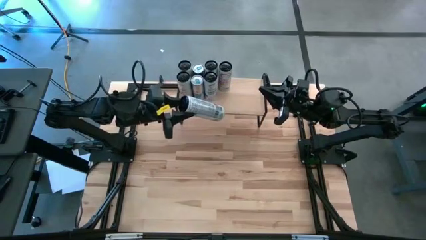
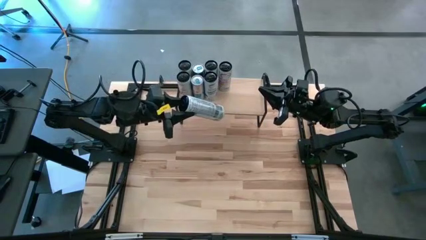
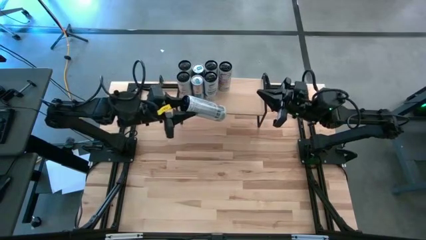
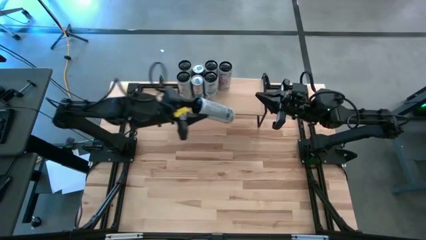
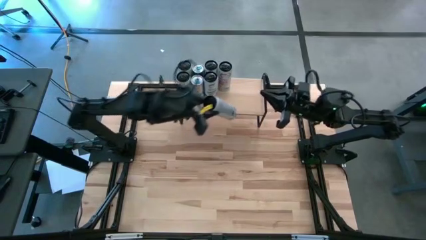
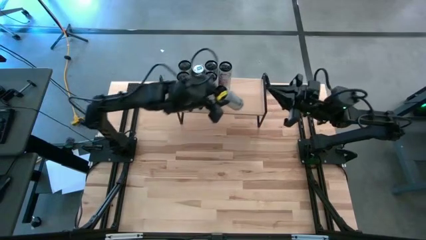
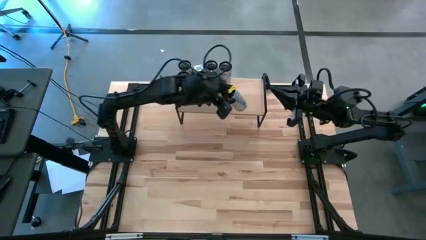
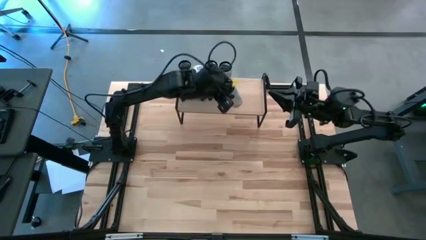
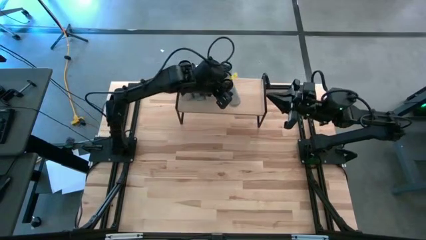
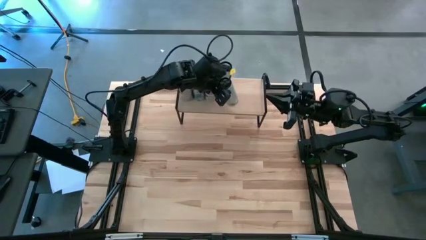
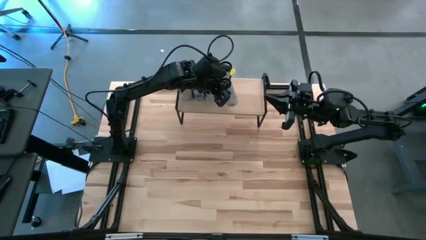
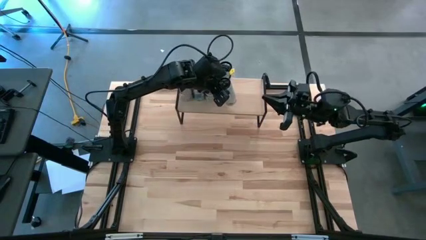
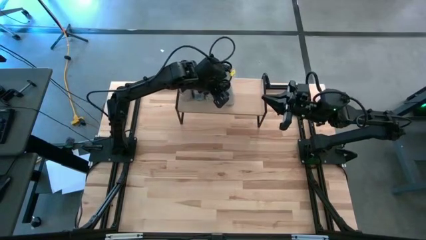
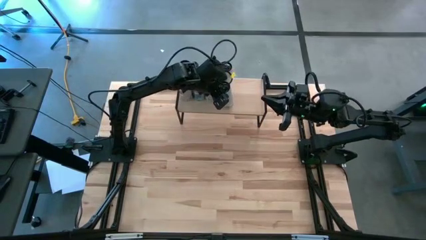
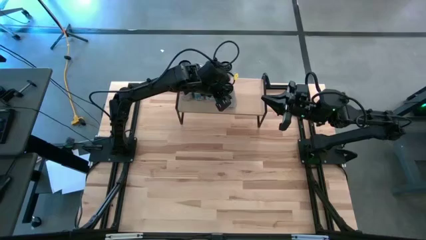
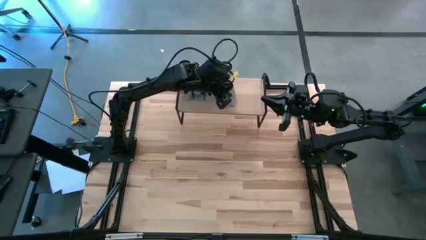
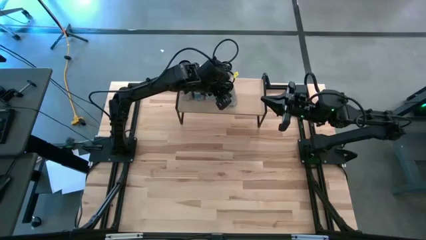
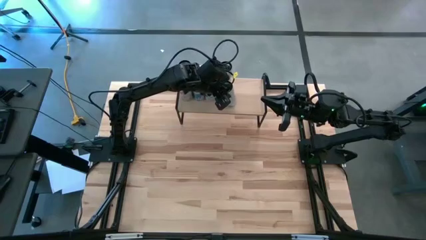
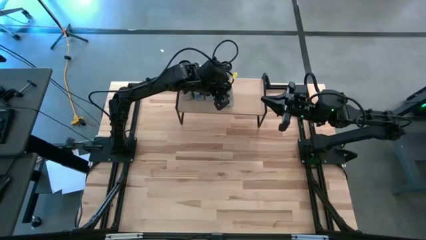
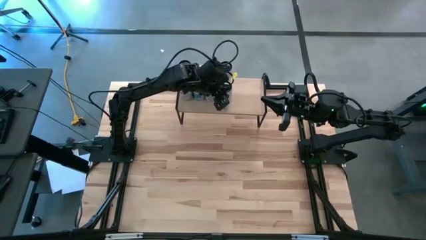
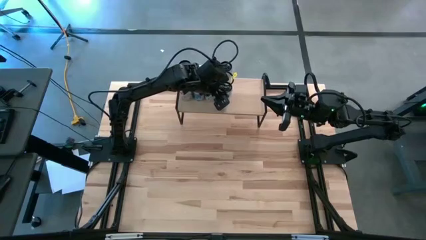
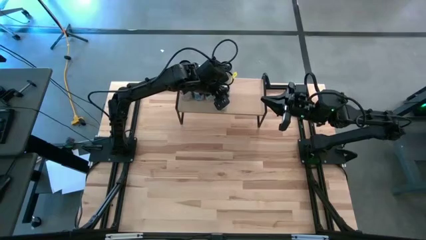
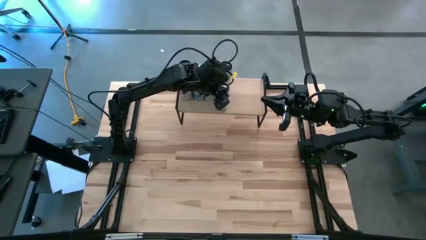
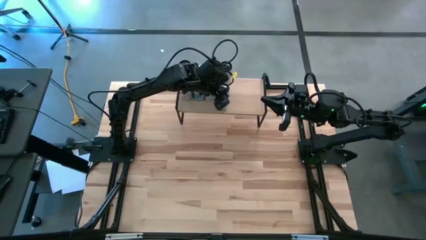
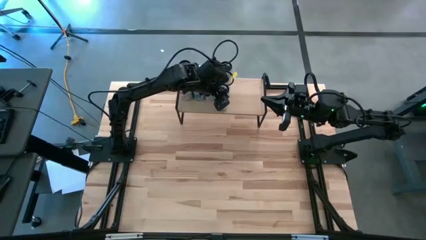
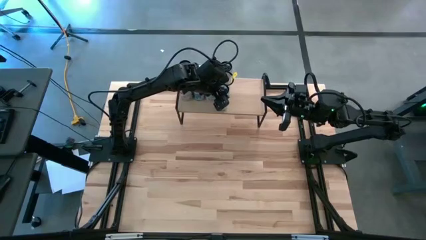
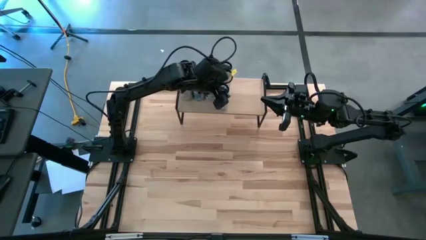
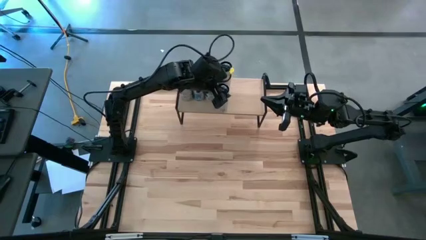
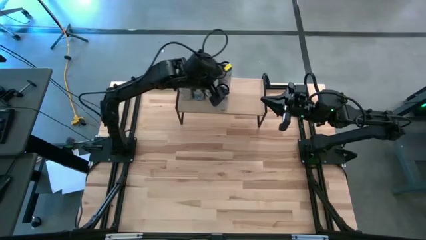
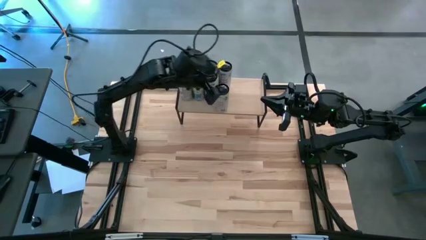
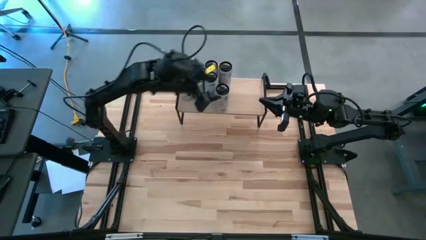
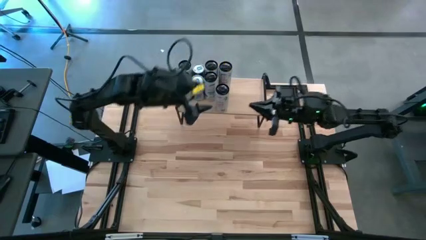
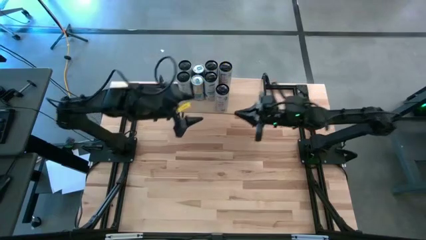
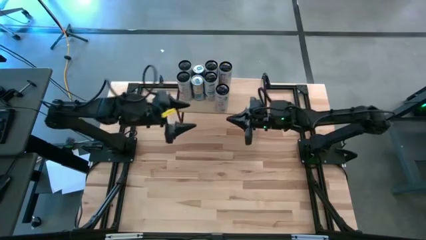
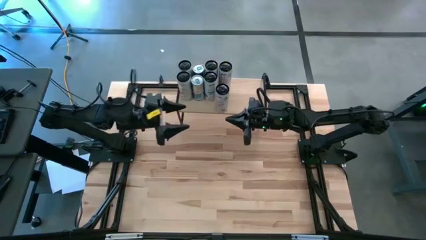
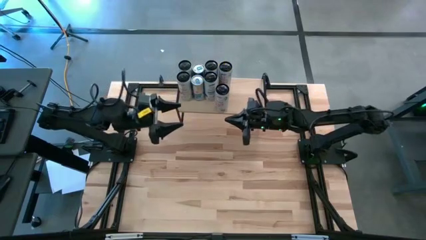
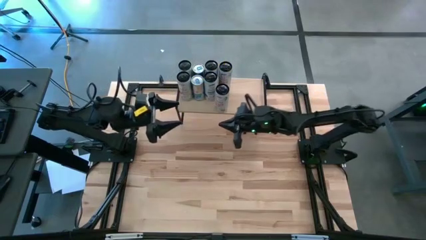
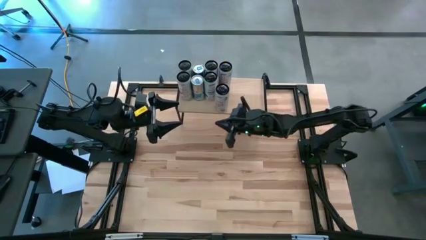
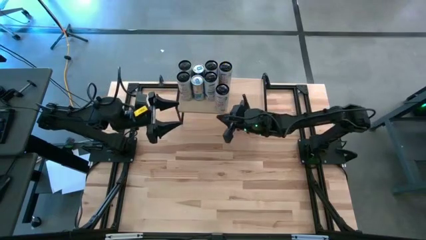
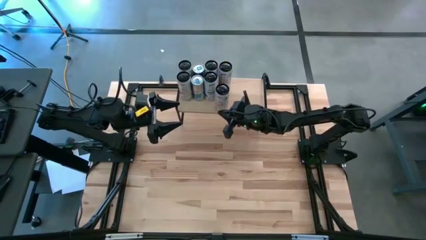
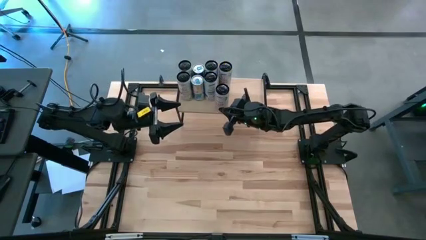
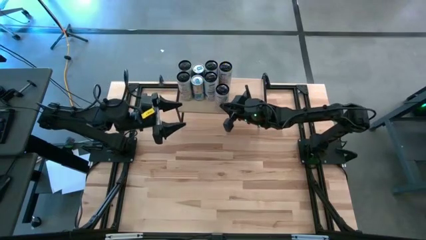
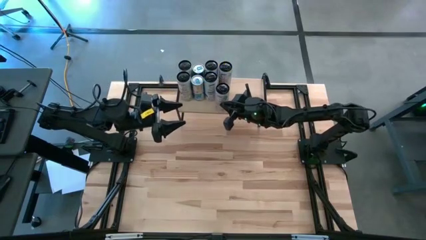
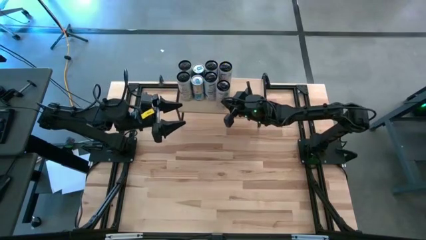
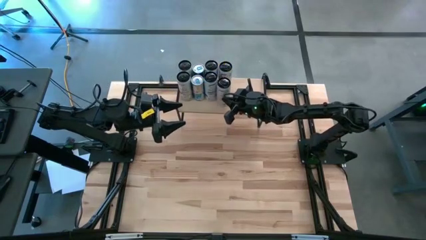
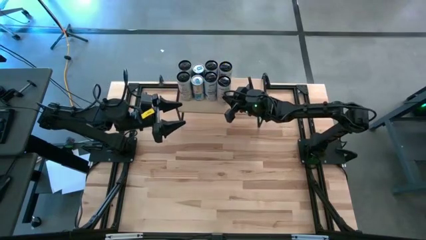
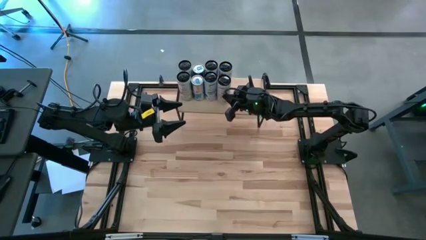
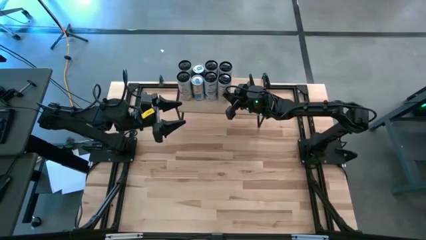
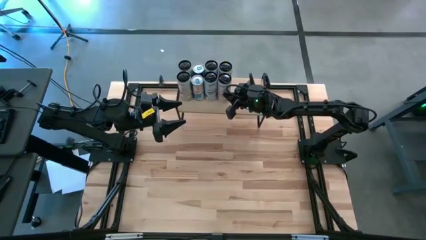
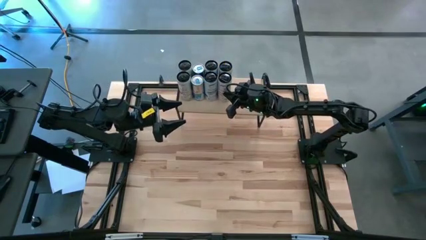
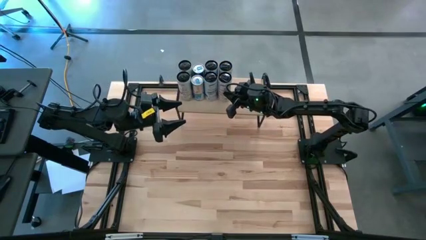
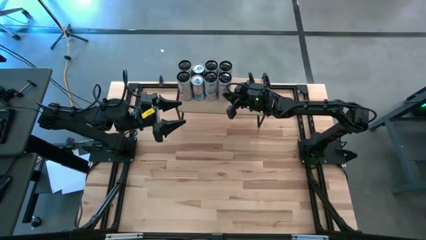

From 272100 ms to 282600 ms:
Task: Place canned beverage on shelf
Put the black soda can on the shelf
